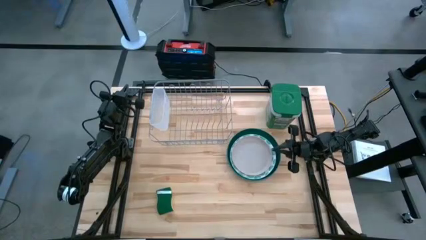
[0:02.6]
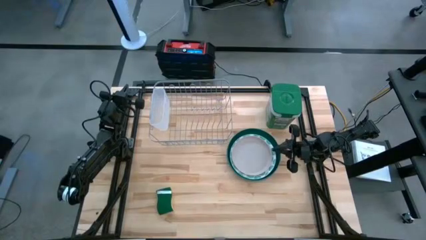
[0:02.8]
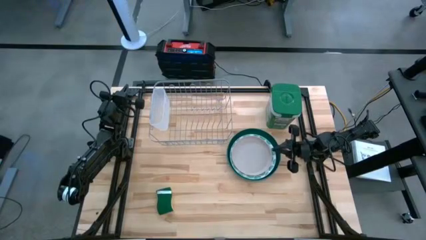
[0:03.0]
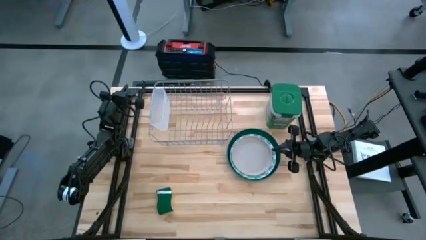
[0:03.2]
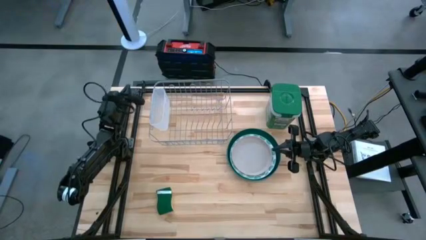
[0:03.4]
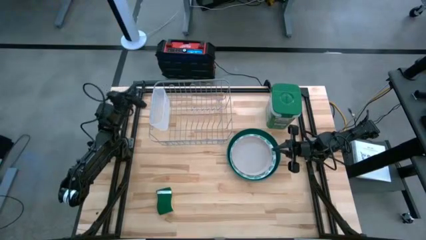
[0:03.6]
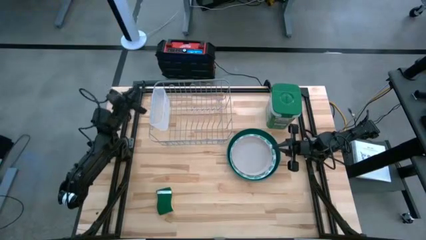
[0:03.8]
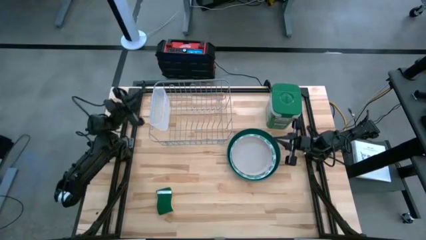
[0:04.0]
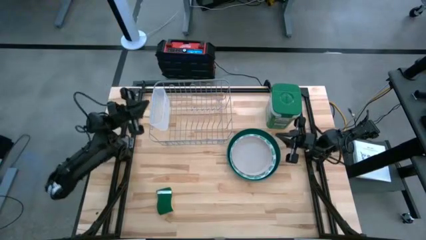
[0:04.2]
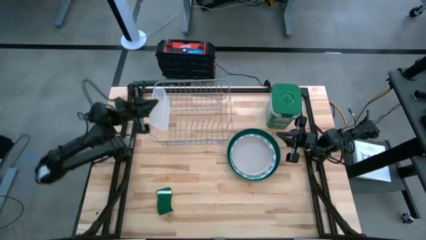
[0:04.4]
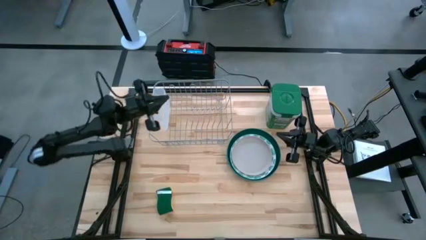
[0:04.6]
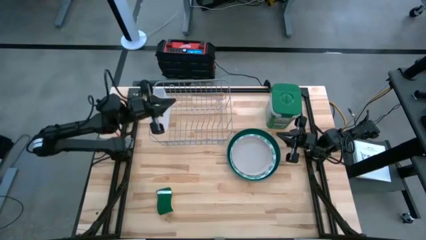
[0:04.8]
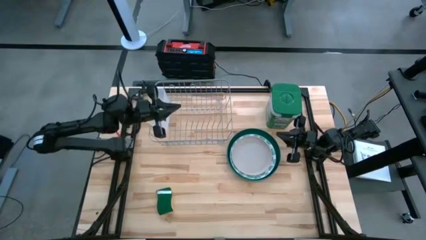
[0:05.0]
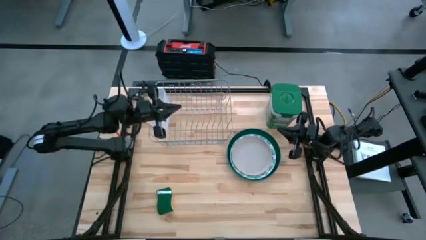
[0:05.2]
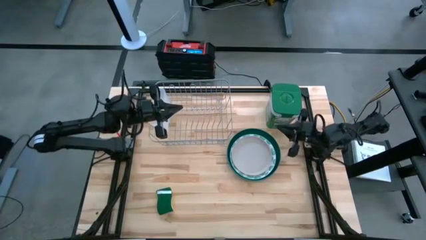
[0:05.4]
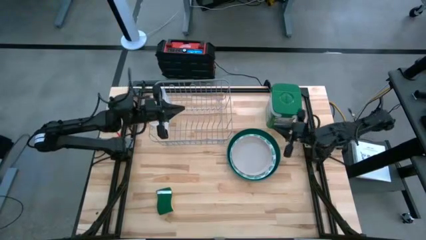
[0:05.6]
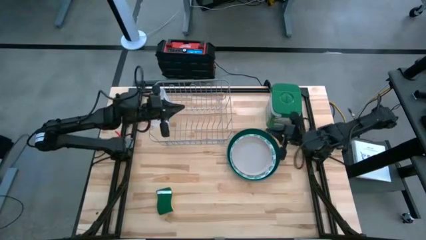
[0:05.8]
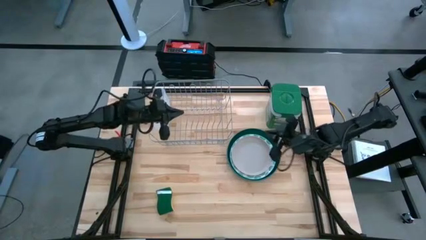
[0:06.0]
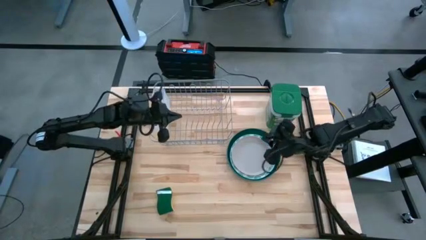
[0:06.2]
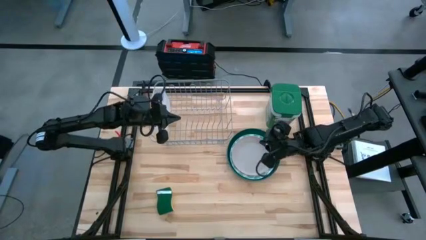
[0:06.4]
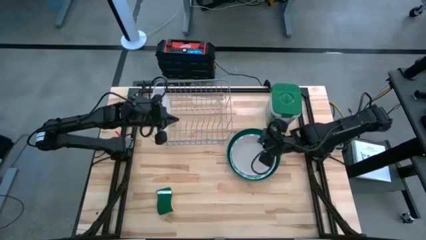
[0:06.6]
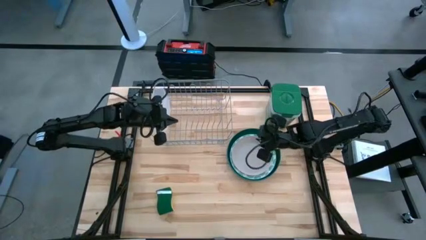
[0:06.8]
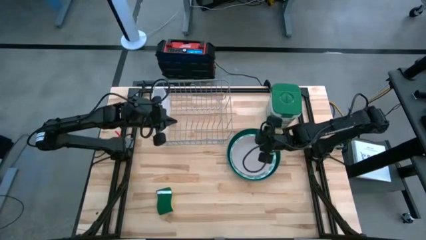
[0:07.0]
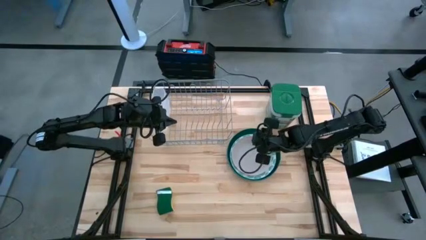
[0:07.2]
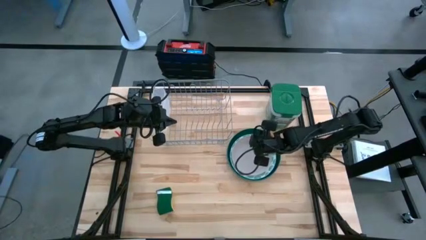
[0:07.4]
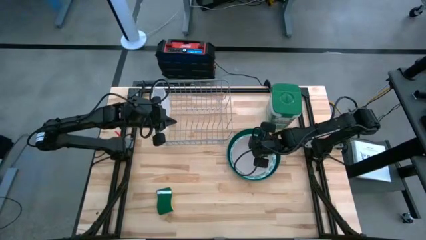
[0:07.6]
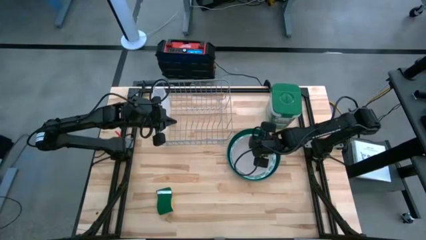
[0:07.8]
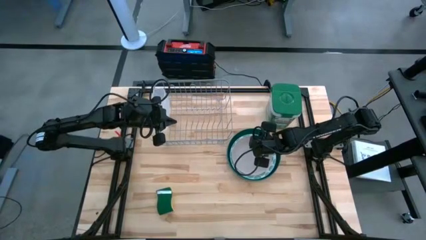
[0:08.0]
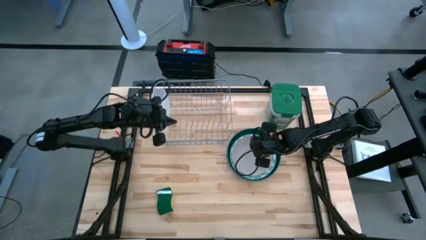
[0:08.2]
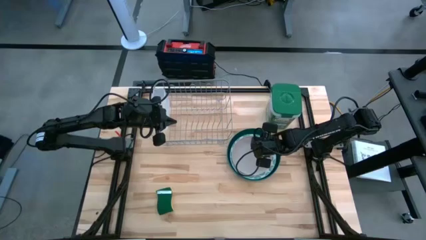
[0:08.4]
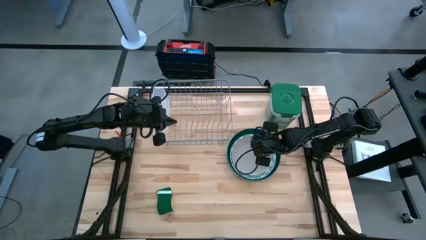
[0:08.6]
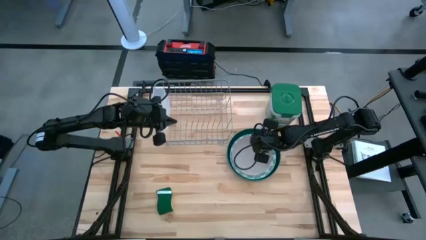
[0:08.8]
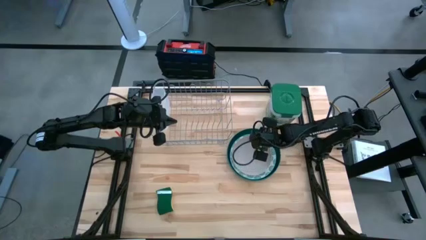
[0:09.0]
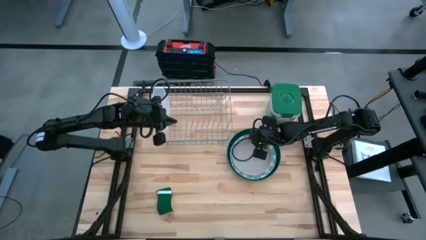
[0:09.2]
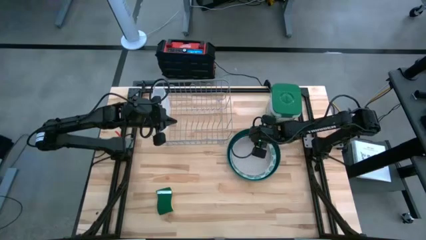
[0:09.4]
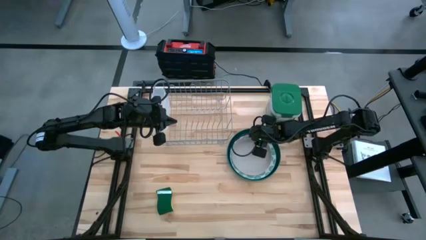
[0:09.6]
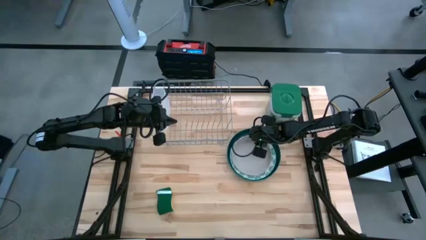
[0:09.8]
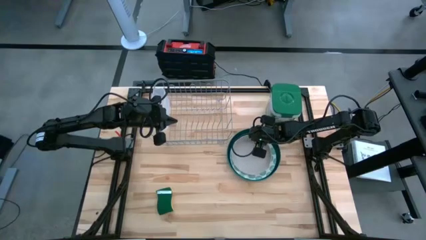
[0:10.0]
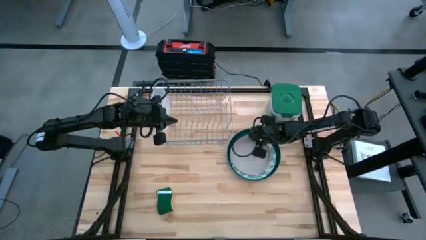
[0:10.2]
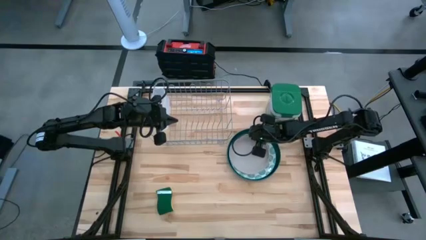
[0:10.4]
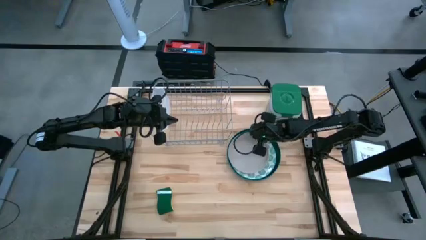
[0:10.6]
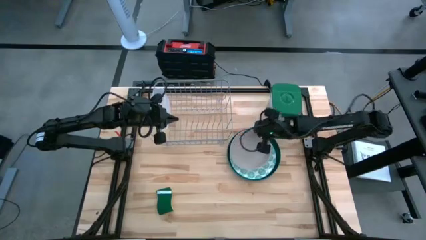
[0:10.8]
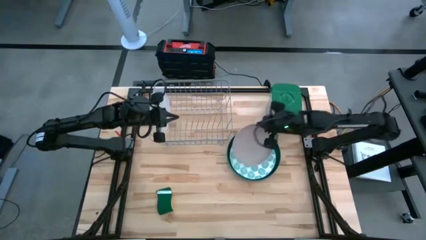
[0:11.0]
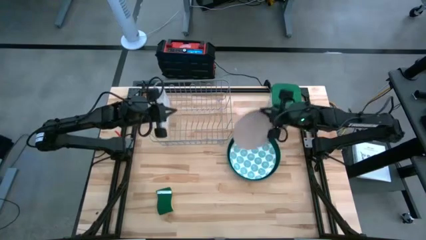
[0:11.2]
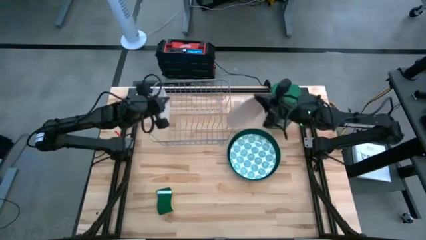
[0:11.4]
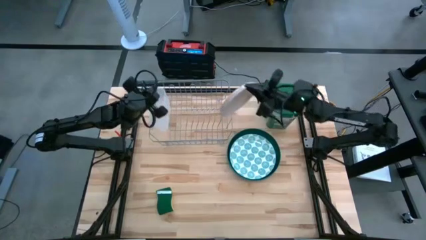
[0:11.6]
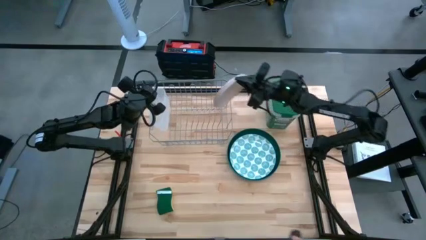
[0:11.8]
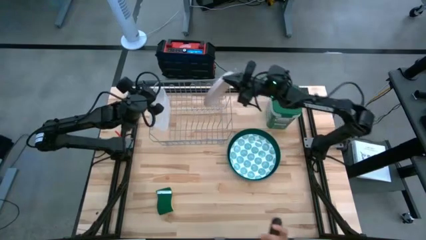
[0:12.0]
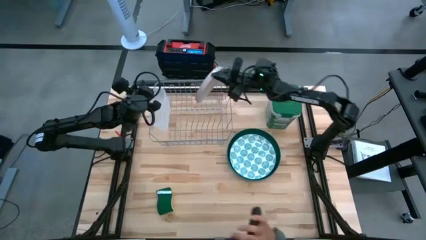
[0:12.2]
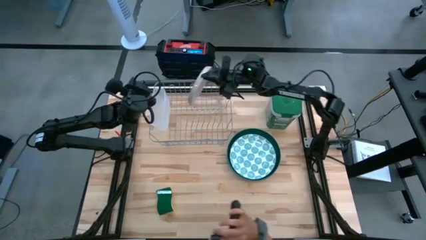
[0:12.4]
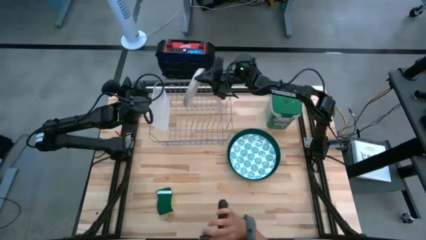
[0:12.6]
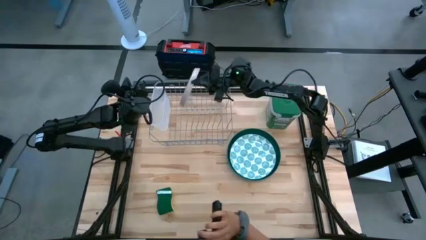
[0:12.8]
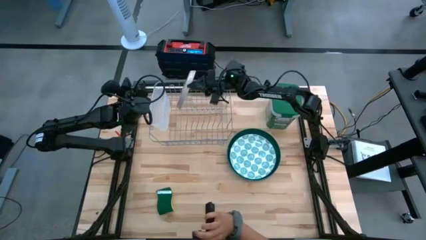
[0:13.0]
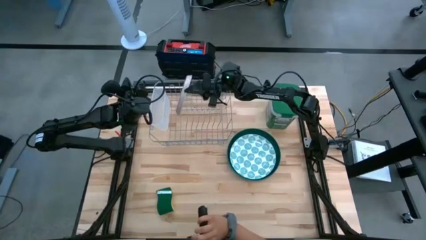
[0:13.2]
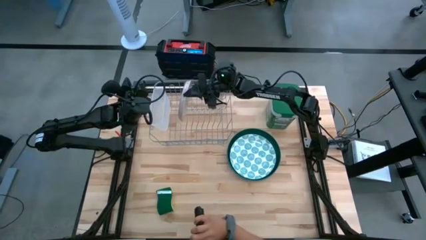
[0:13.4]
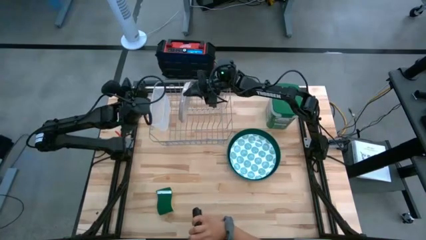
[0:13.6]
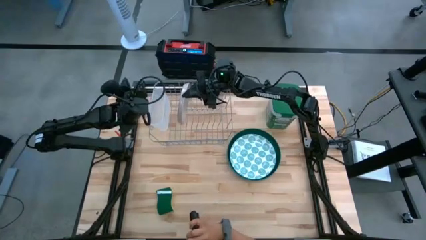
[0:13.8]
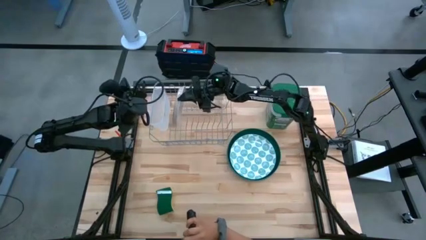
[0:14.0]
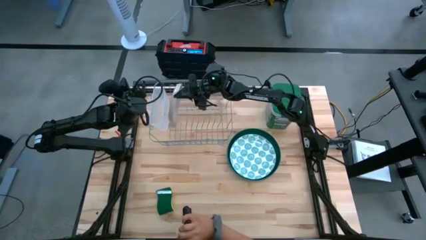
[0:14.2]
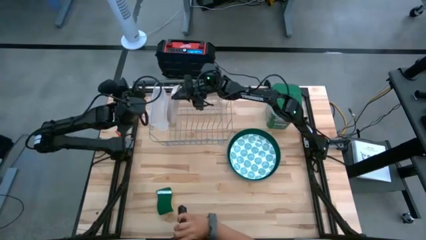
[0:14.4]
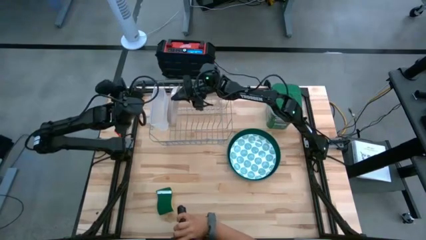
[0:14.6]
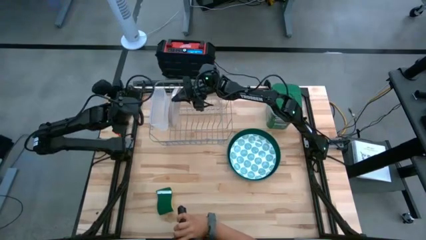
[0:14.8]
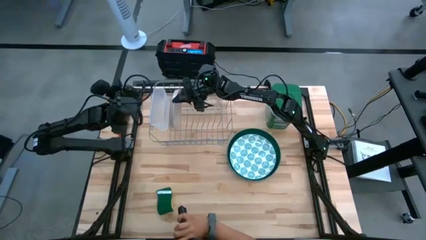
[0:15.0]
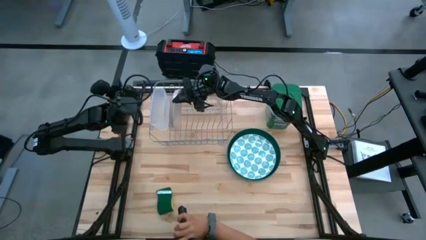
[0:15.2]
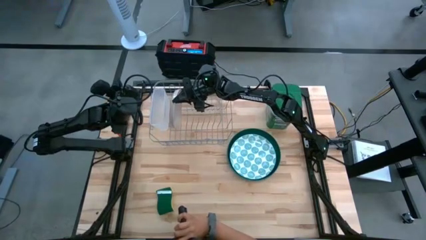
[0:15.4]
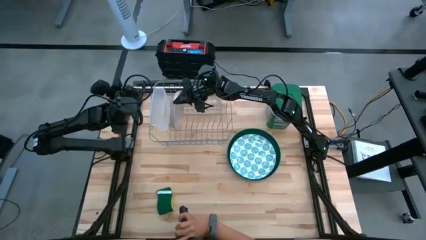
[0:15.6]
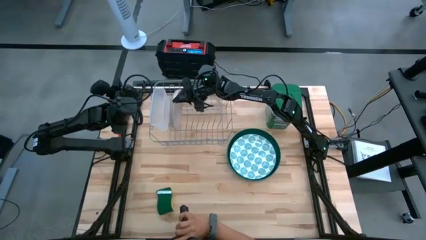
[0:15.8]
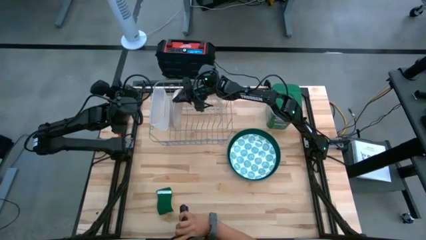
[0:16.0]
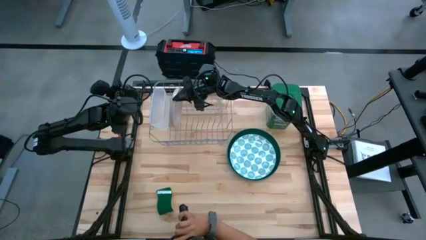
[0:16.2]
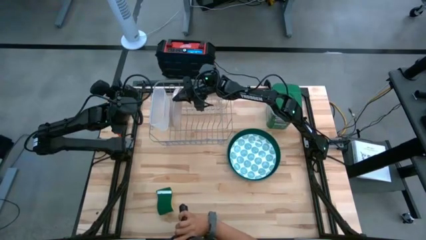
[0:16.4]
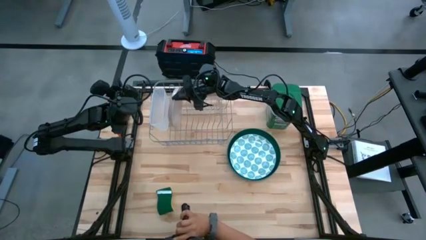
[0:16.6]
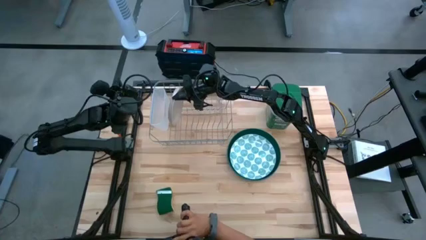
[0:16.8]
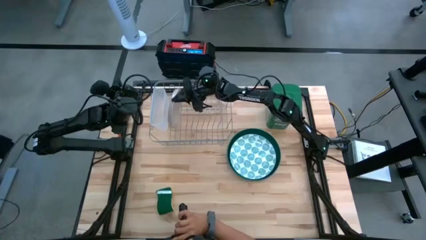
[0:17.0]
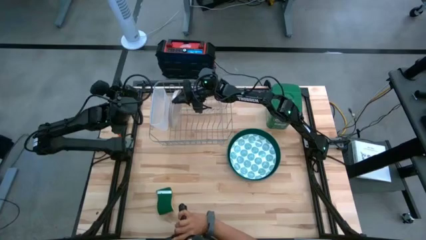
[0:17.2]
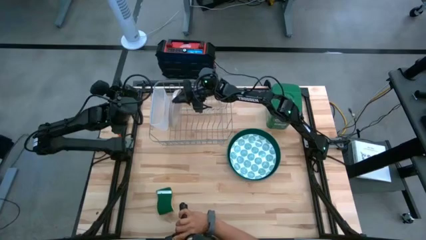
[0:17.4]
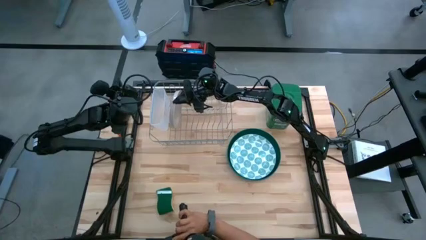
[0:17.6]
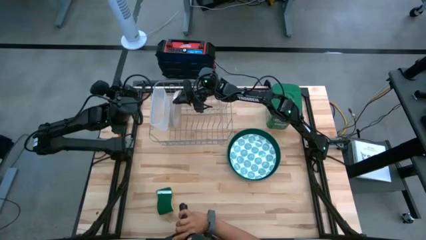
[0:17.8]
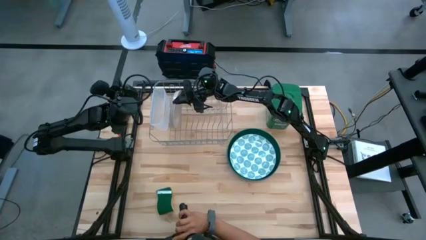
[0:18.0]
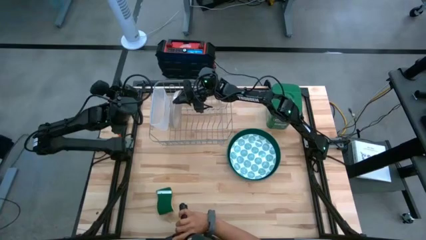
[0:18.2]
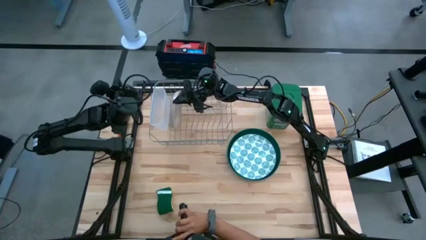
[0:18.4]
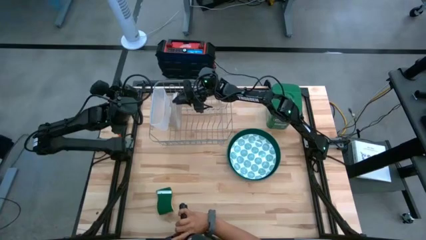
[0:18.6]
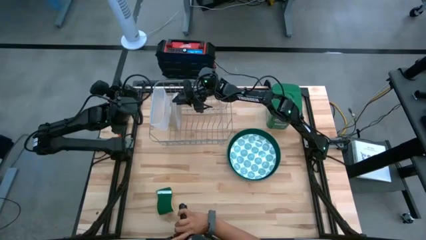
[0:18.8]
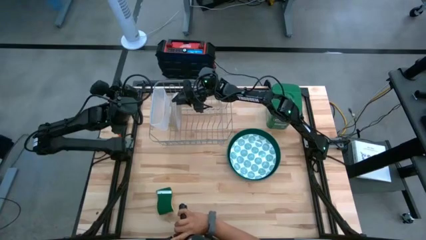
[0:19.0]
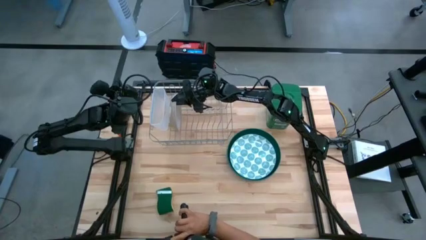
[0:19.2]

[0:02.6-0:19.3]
Task: Sort dishes
Put the white plate on the dish rack
